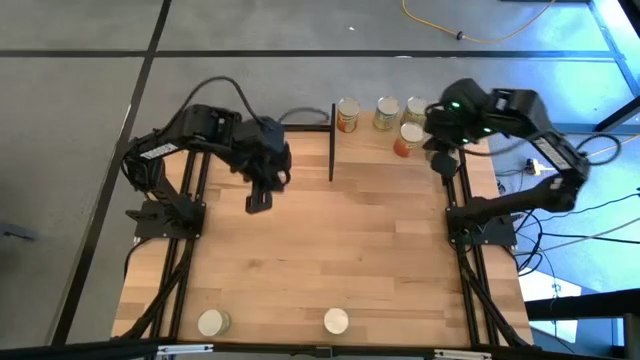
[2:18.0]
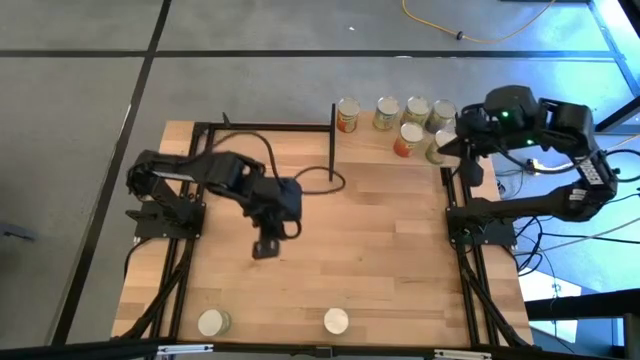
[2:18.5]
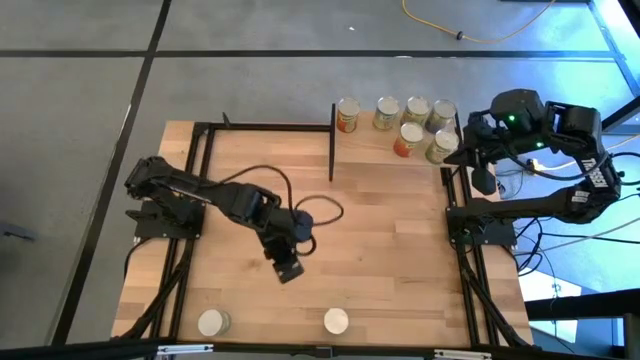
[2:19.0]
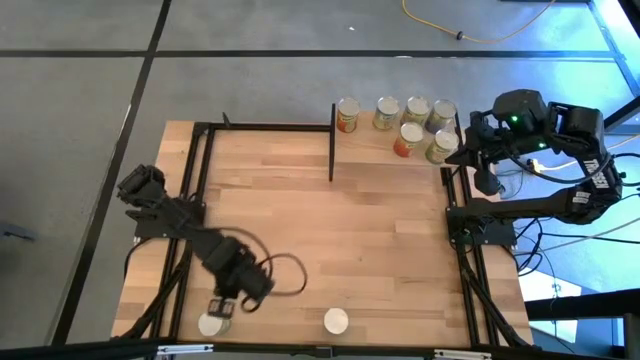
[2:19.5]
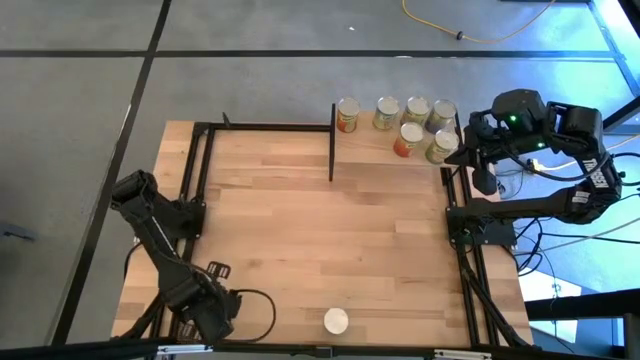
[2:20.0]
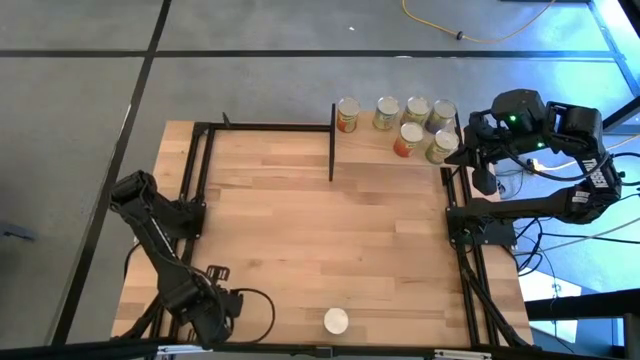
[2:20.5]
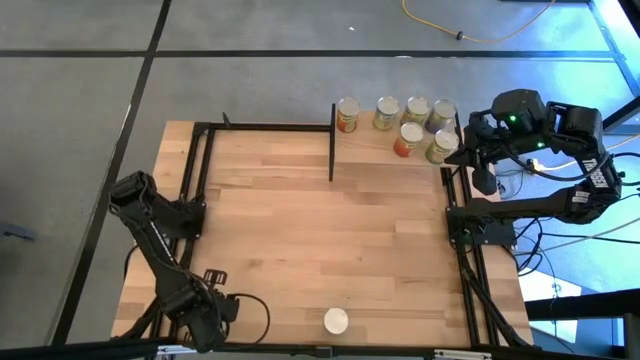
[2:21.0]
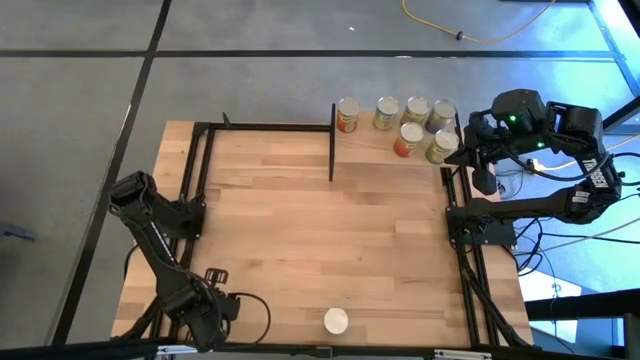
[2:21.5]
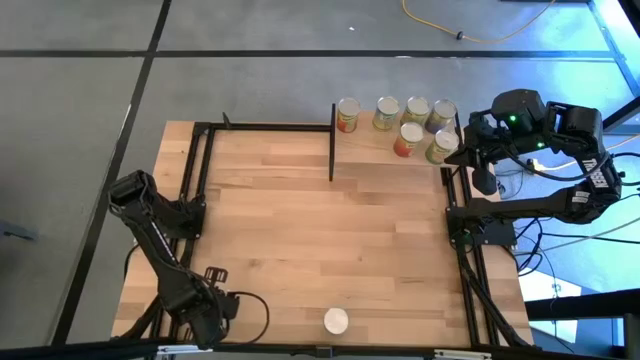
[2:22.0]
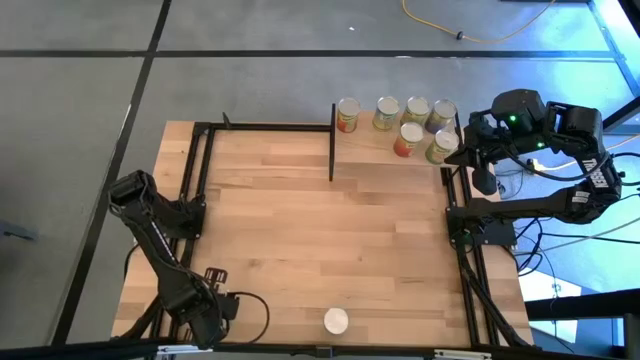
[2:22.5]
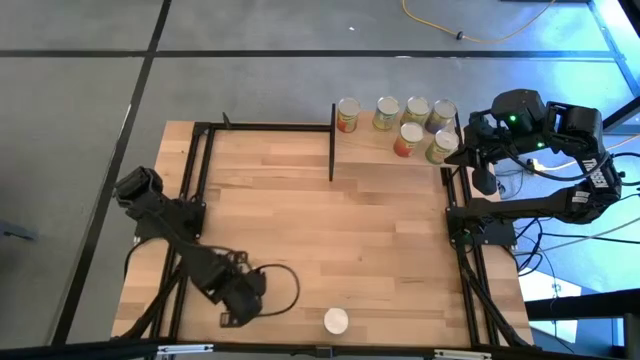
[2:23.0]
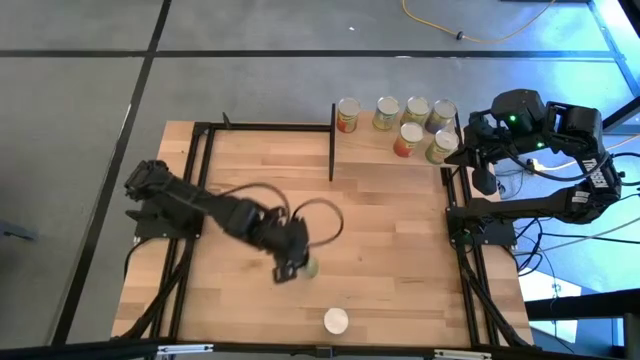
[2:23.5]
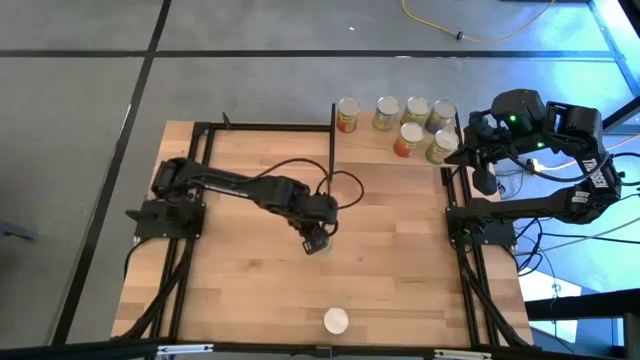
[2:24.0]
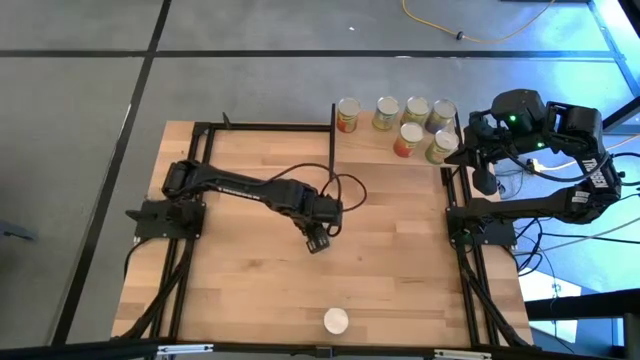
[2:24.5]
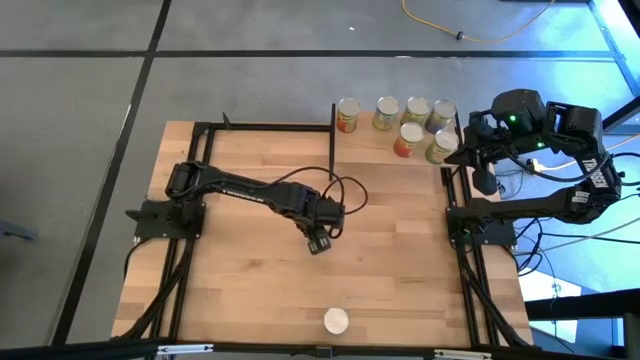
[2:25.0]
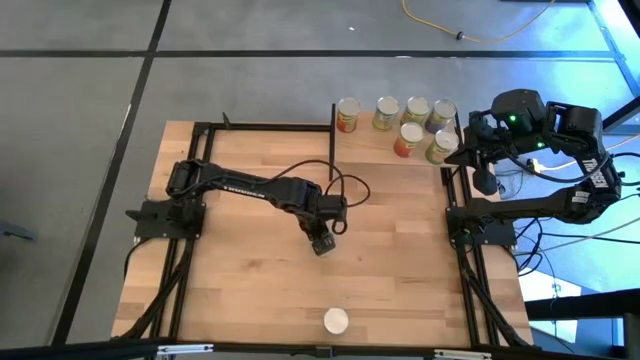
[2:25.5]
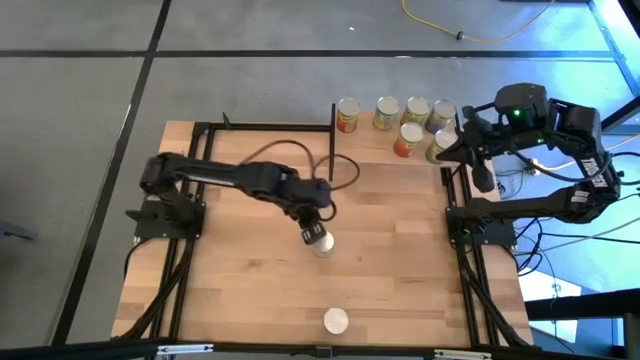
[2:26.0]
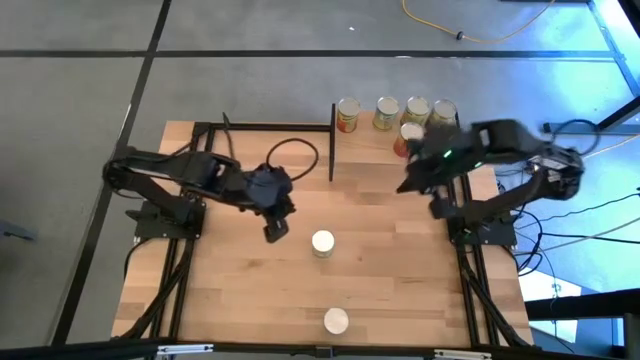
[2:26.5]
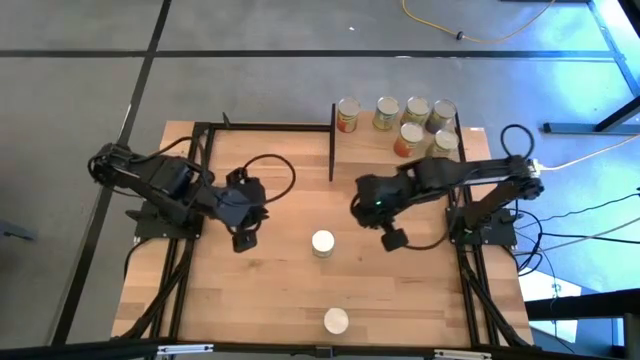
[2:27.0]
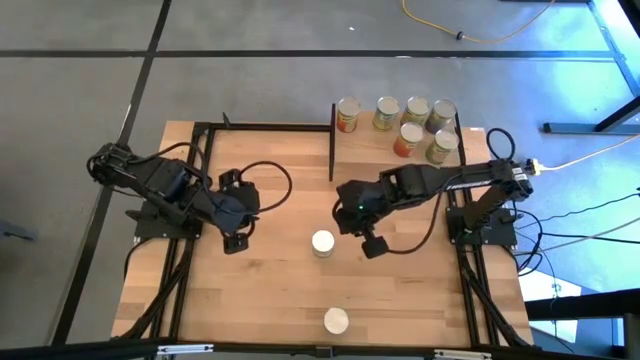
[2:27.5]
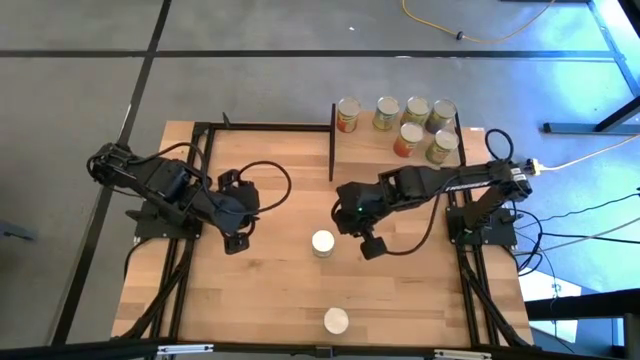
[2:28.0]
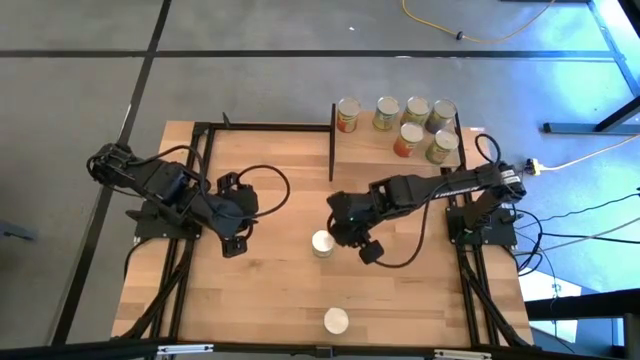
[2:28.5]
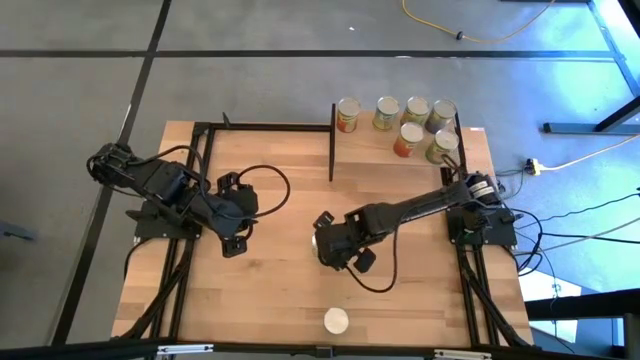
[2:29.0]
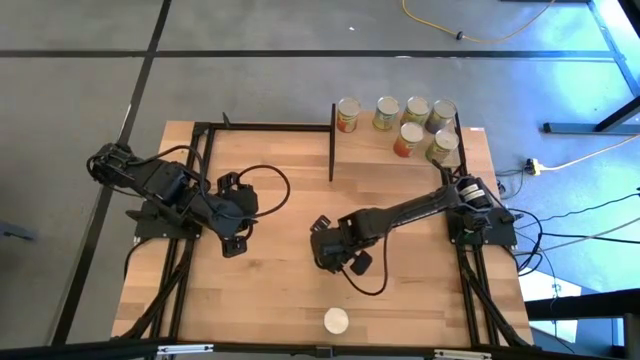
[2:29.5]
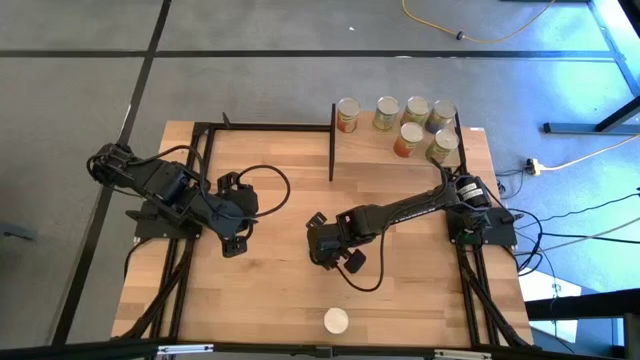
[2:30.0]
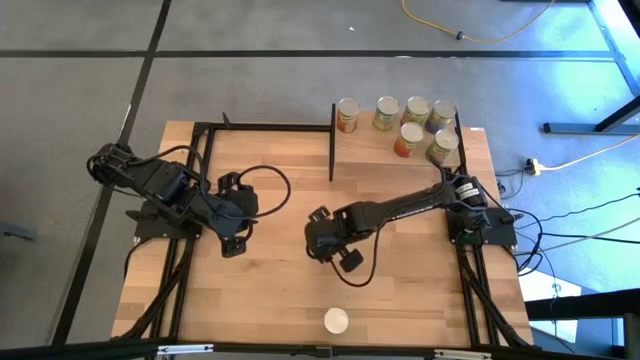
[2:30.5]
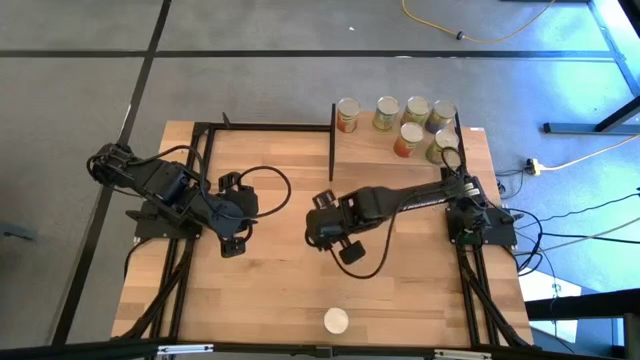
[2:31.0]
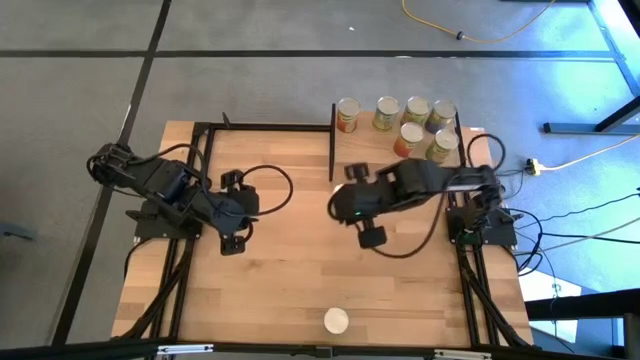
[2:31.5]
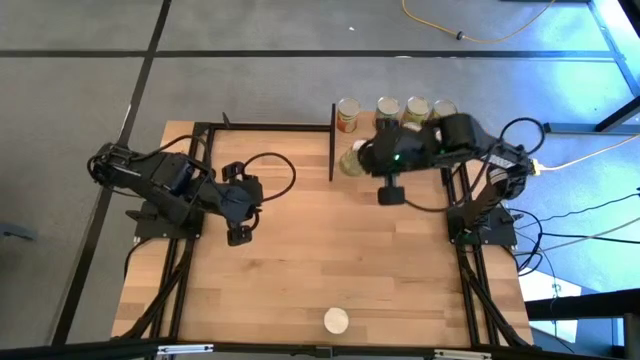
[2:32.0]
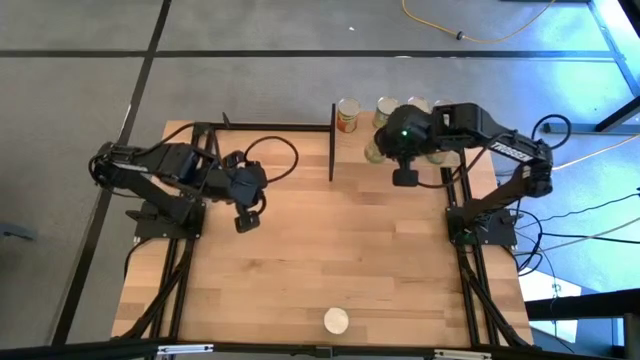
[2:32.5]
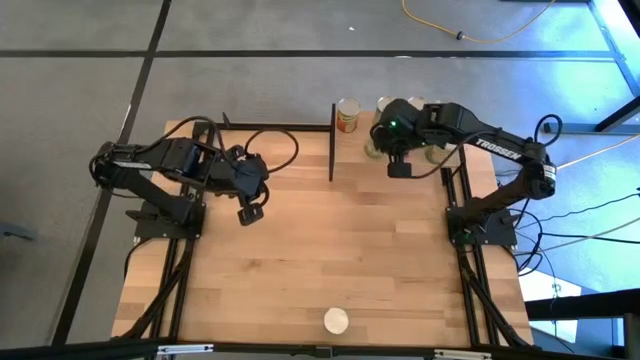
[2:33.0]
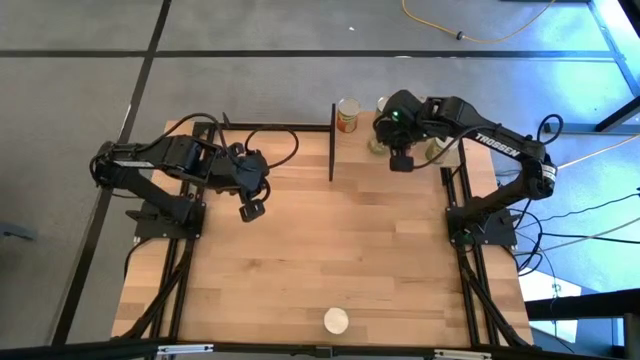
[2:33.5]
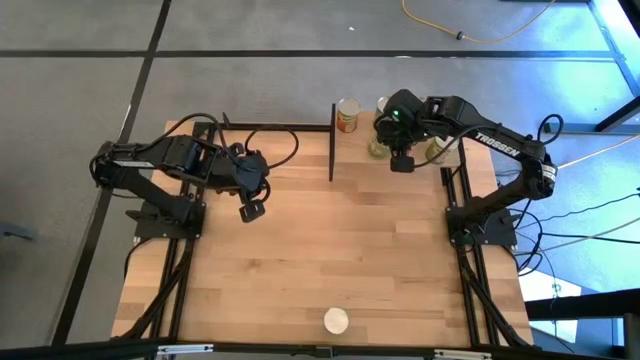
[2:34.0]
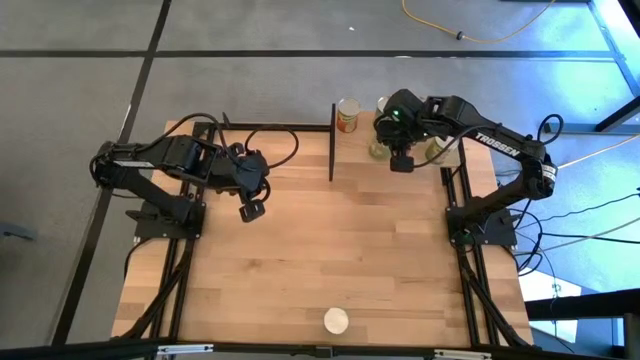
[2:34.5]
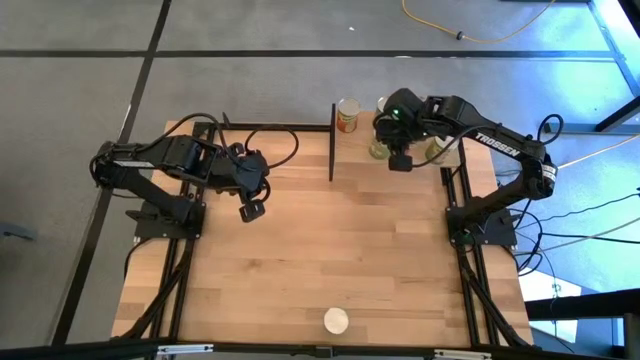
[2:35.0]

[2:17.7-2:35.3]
Task: Pick and place cans onto a shelf
Put the left canned pears on the shelf

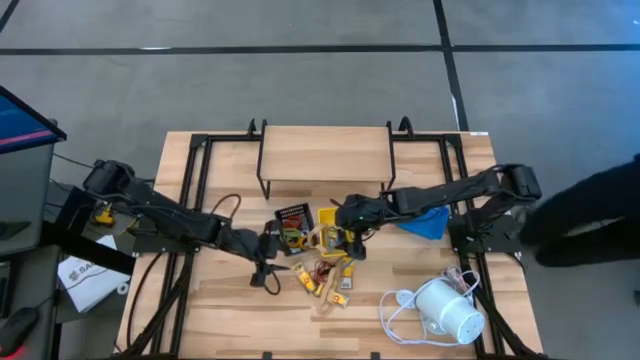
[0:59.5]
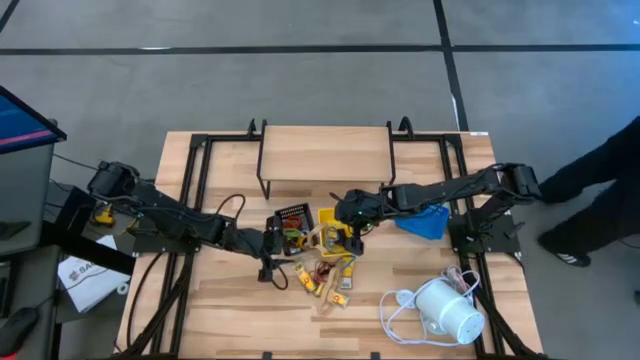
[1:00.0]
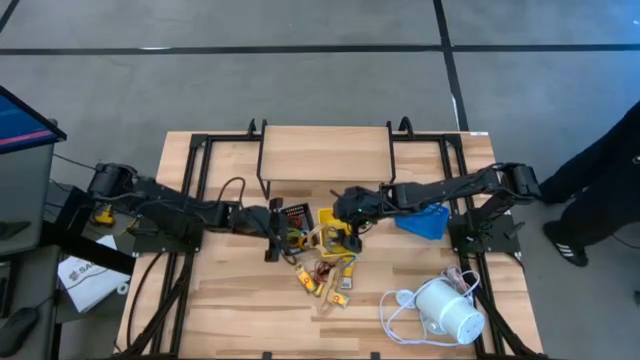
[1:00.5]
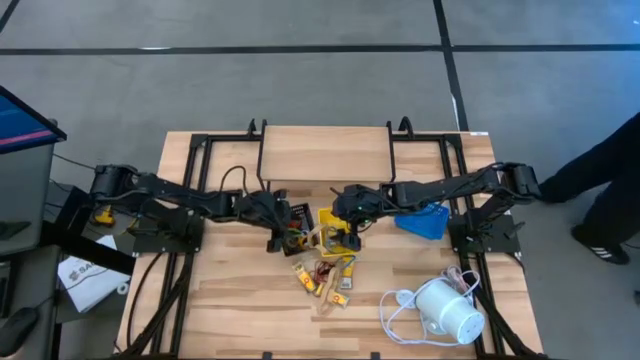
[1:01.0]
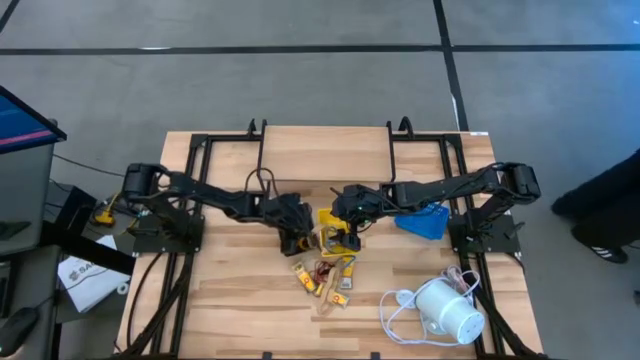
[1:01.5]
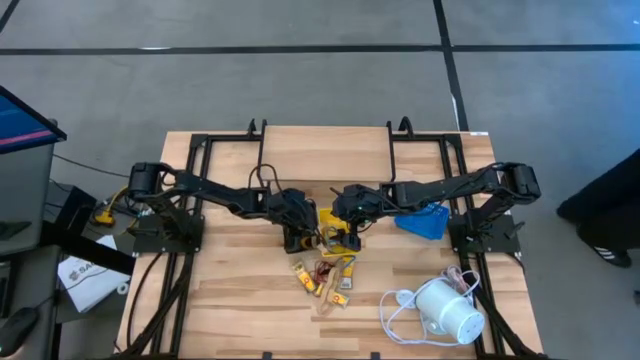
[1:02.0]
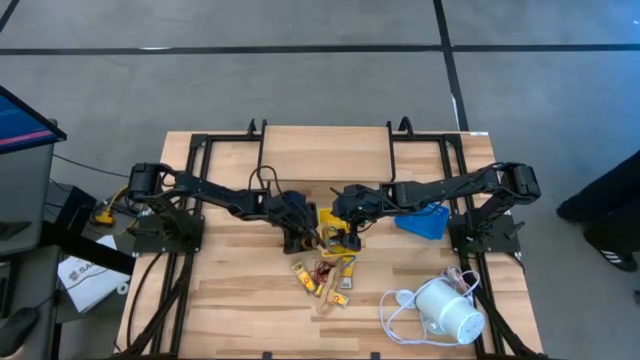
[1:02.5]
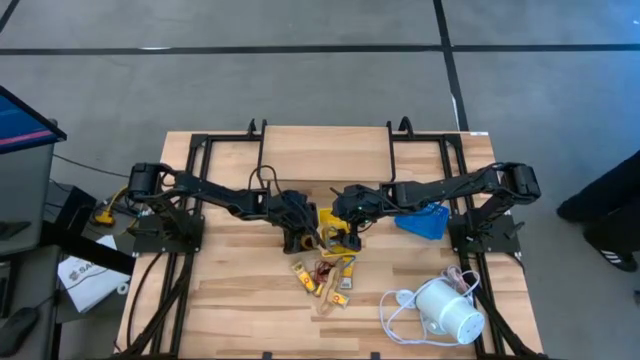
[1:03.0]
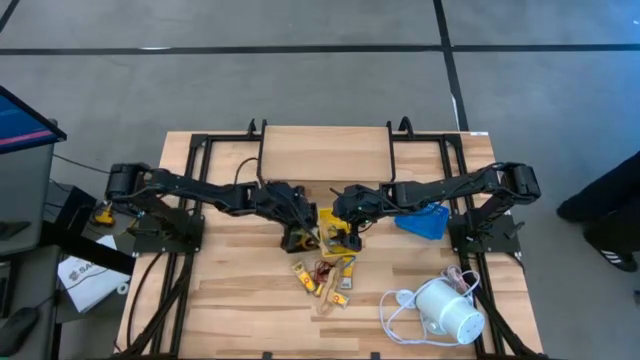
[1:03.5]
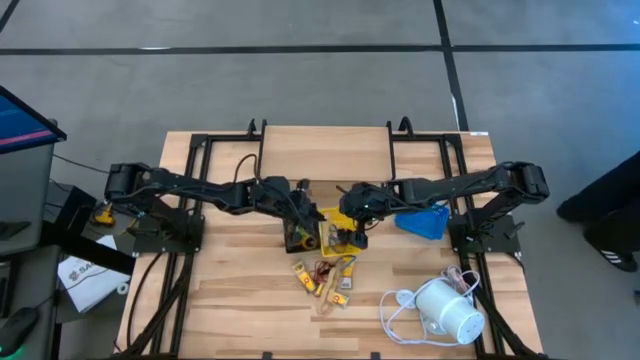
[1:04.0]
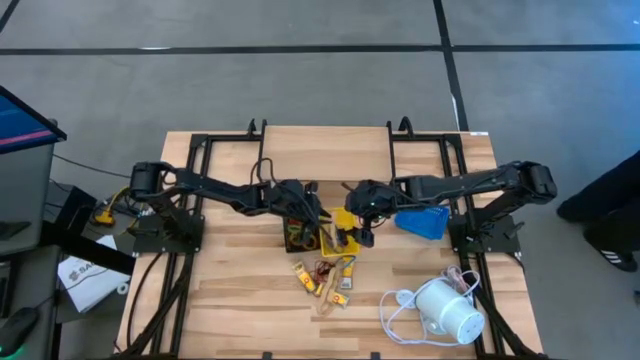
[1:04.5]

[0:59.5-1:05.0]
Task: Pick & Place Office Desk Supplies
Adjust the light brown rubber band on the yellow bin
